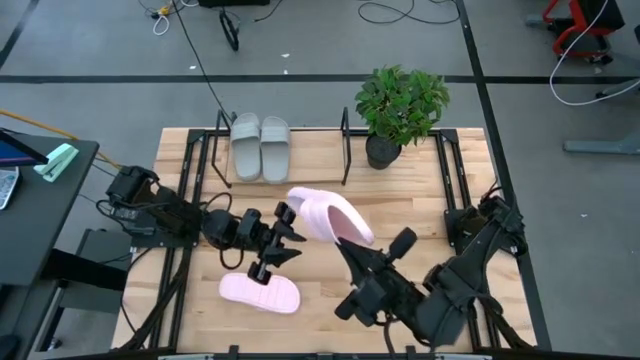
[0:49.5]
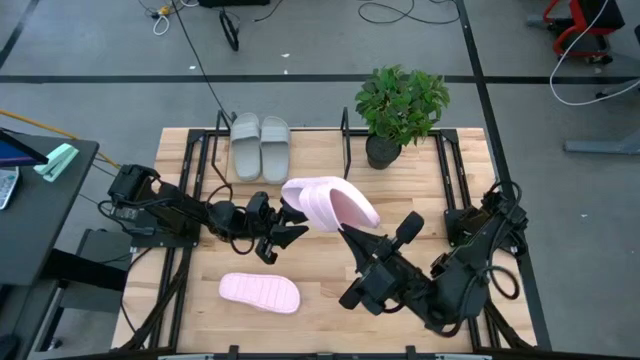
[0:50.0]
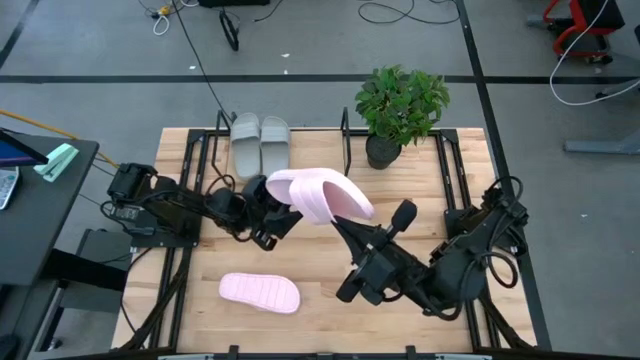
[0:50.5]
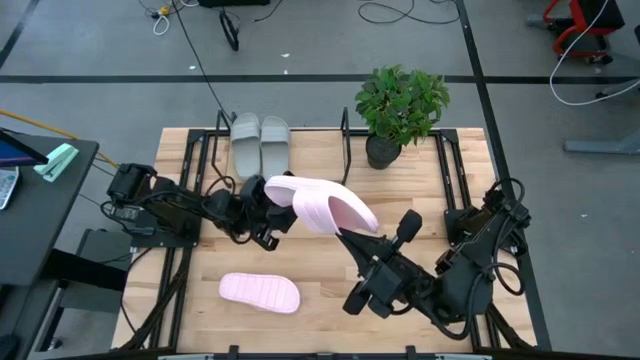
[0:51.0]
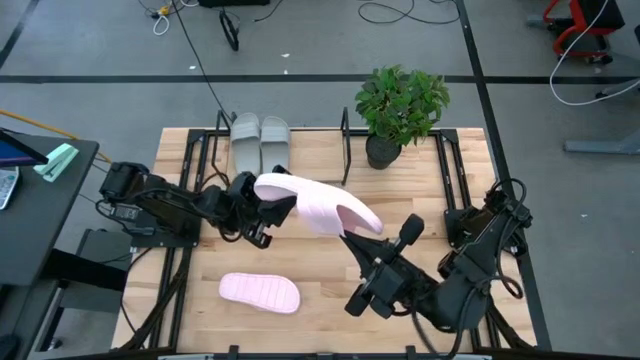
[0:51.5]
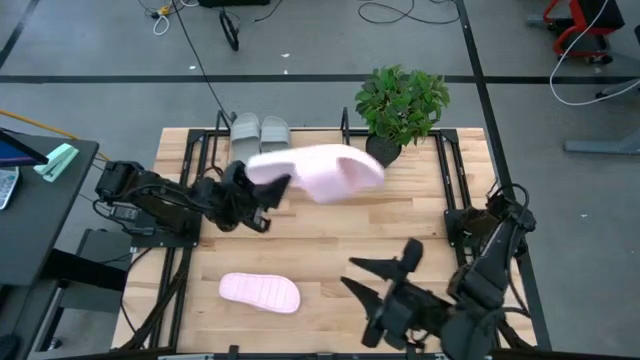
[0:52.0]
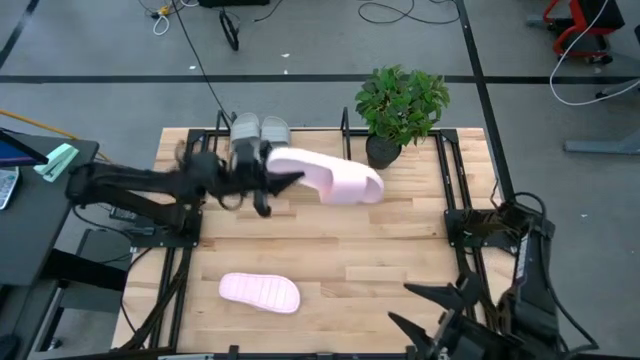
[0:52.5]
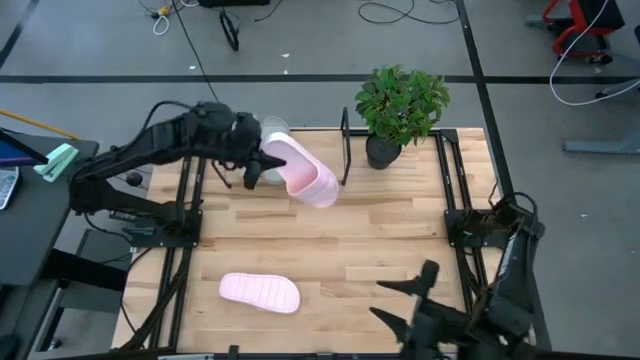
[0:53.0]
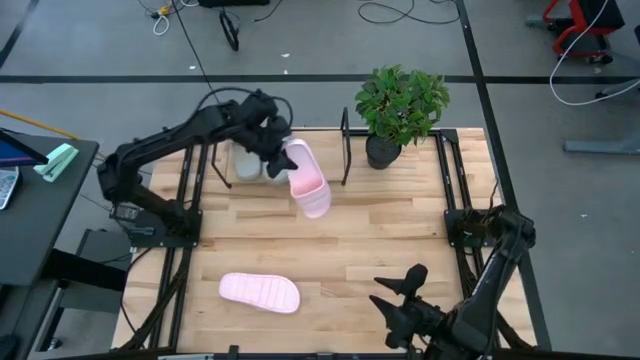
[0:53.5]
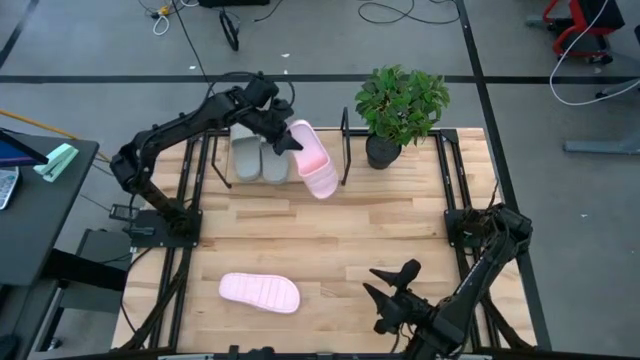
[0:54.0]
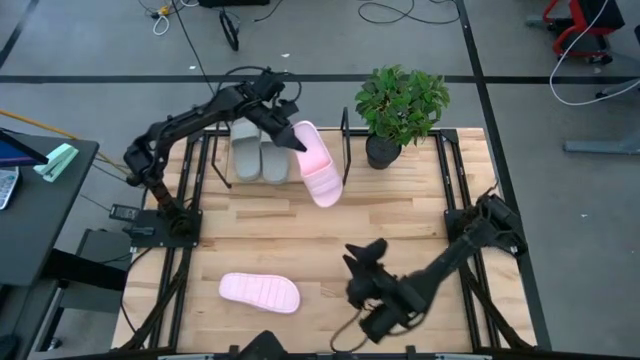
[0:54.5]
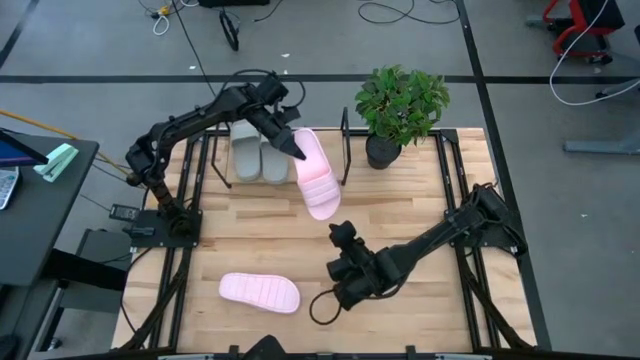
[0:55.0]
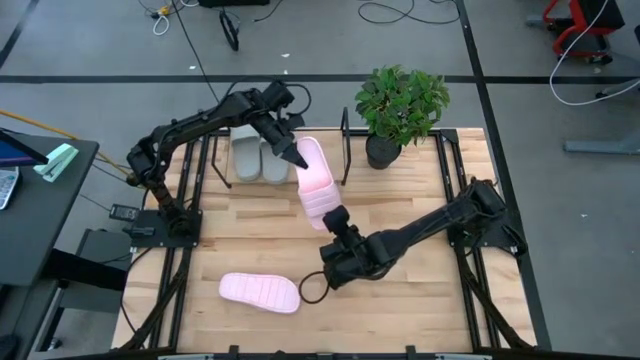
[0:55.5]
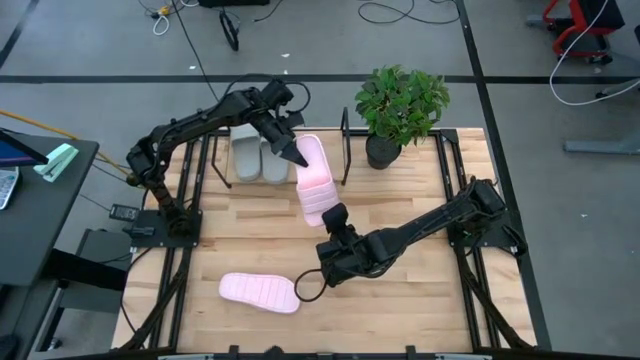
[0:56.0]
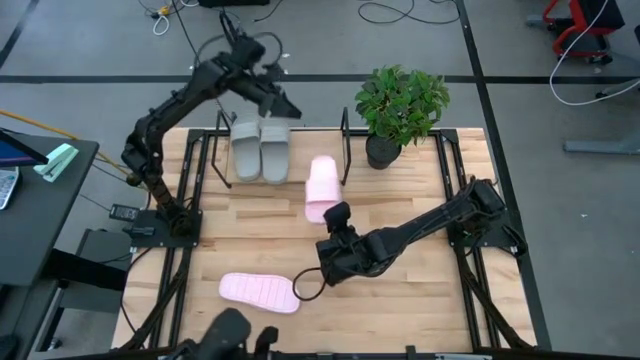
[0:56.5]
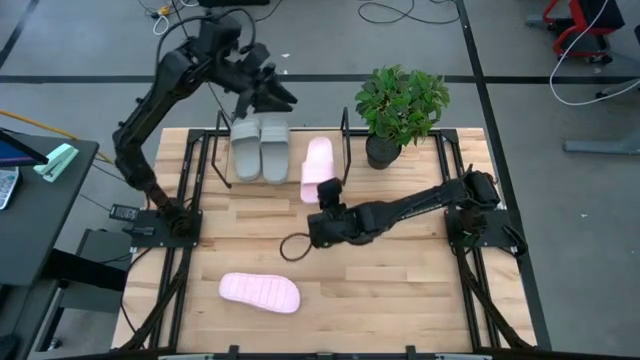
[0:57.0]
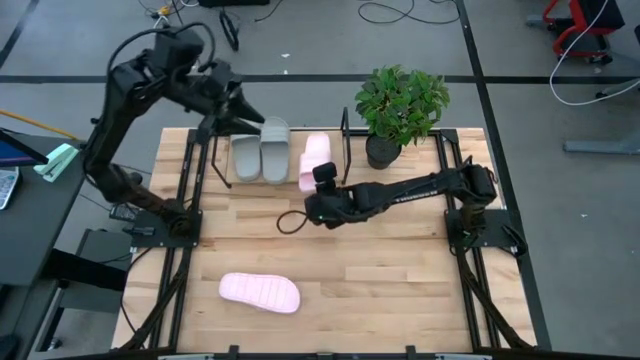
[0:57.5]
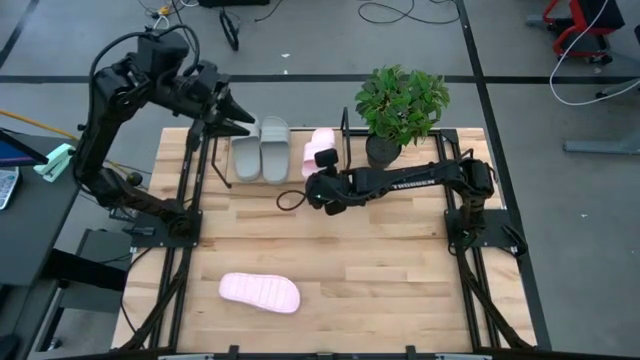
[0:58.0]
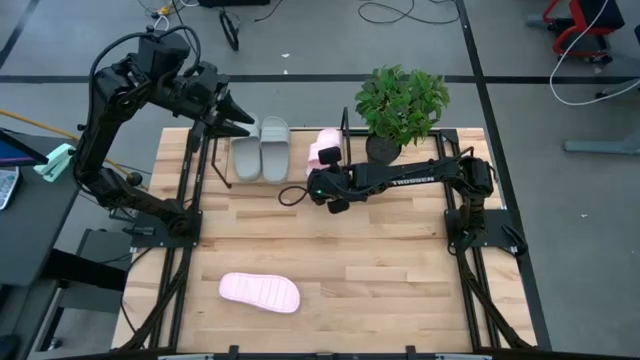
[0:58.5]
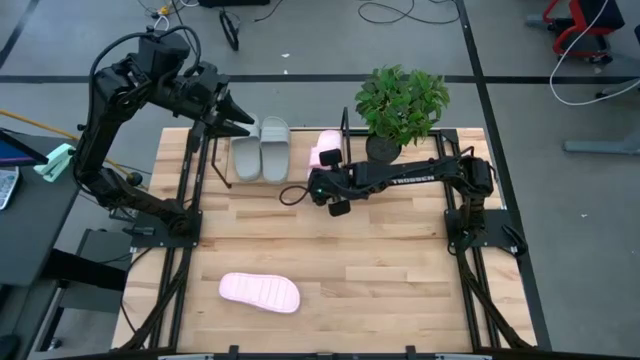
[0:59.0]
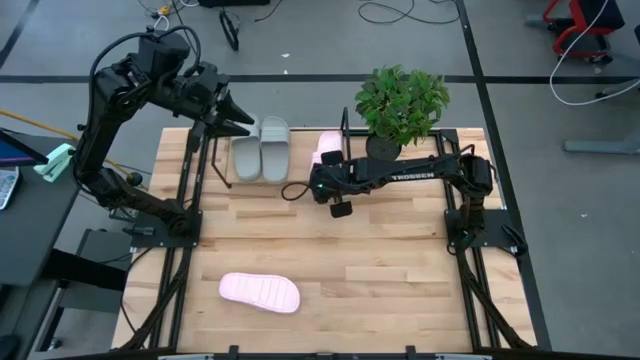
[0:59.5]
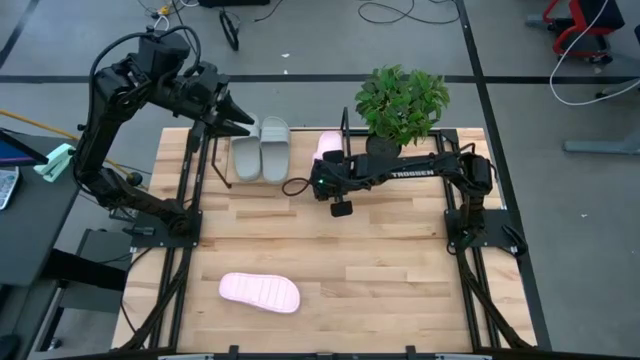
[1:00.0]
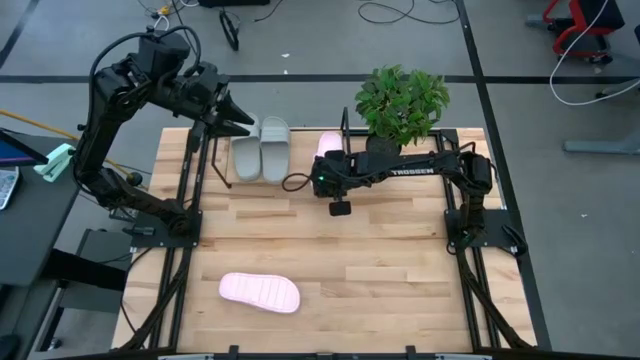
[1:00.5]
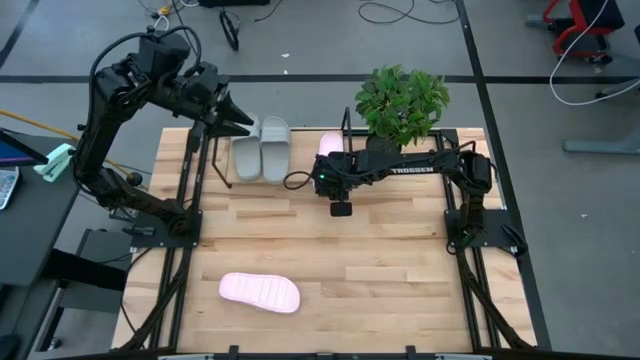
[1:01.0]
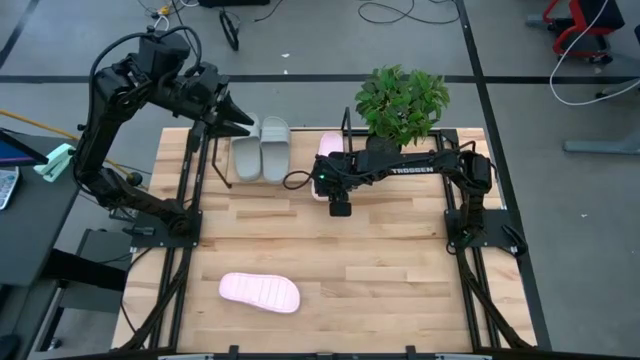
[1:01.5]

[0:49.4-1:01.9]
Task: Pick and place slides into the shelf
Put the bottom pink slipper on the shelf

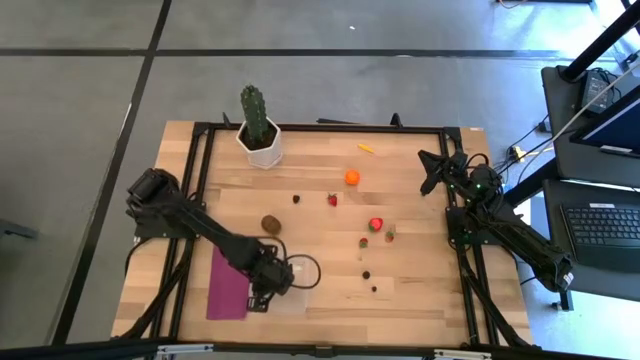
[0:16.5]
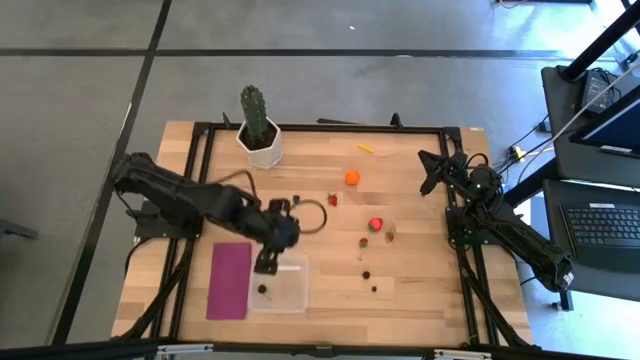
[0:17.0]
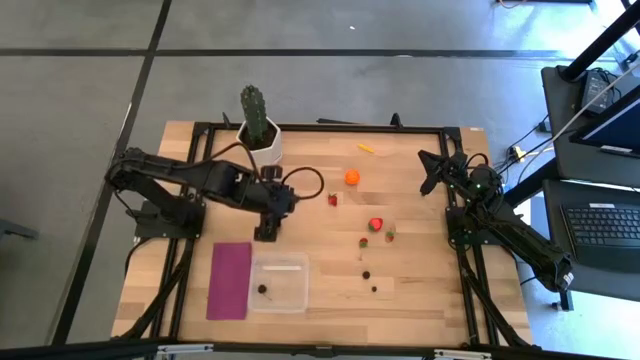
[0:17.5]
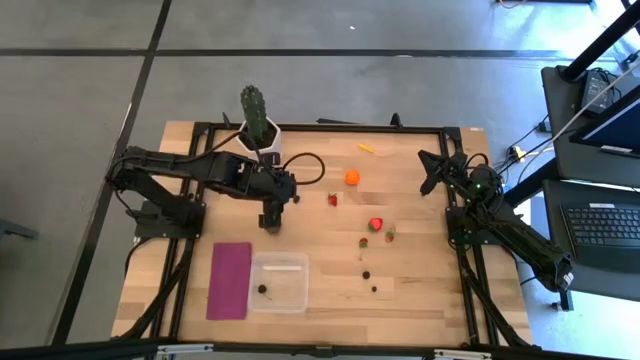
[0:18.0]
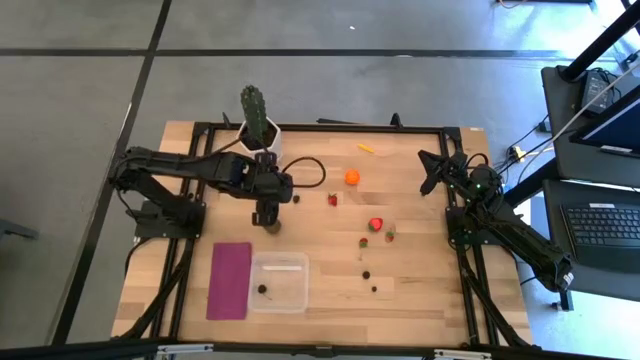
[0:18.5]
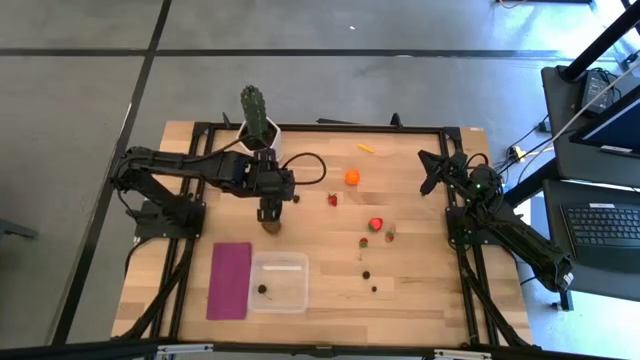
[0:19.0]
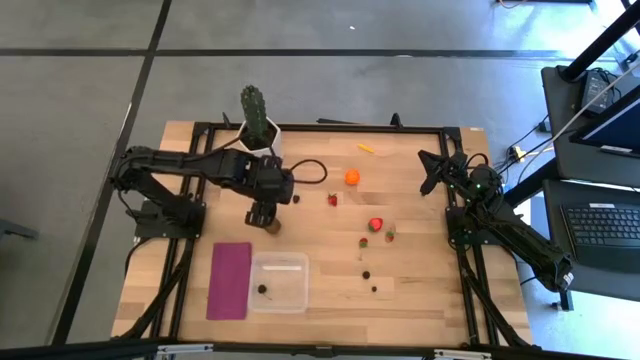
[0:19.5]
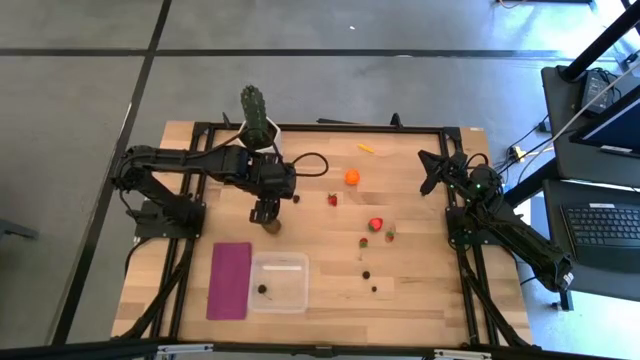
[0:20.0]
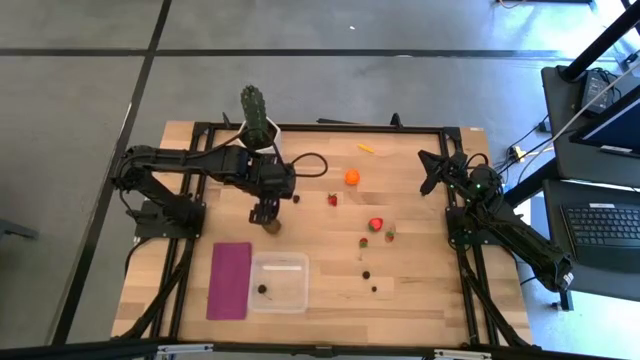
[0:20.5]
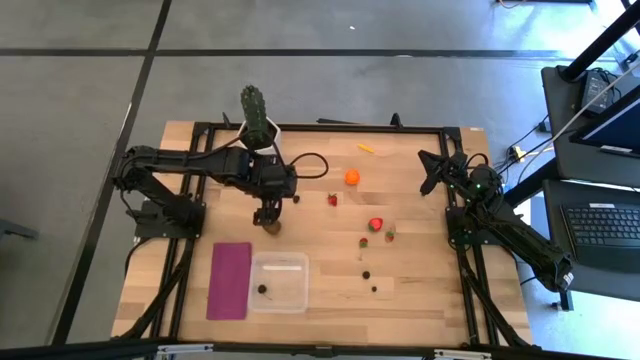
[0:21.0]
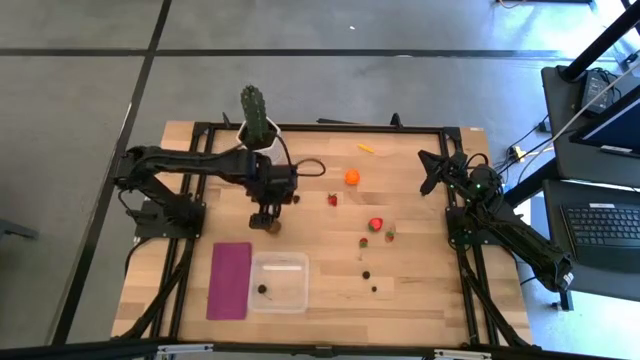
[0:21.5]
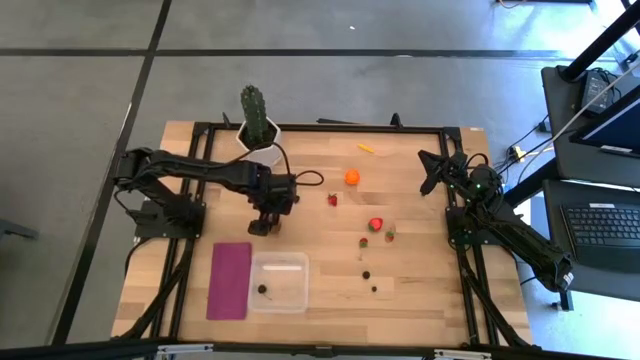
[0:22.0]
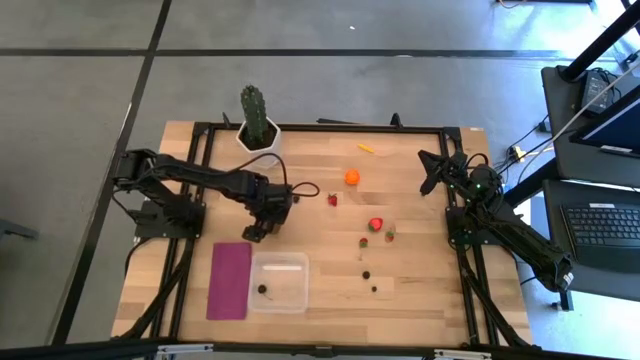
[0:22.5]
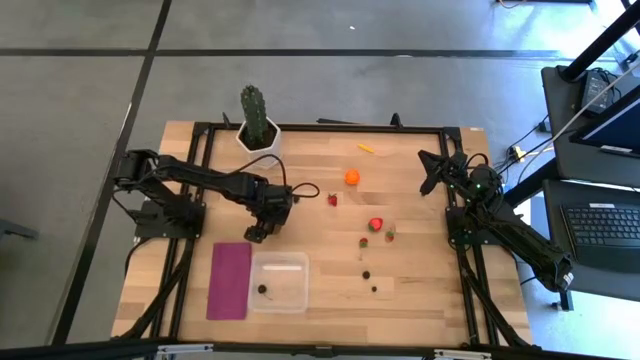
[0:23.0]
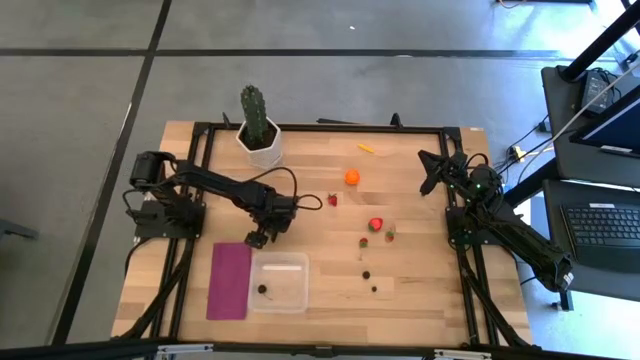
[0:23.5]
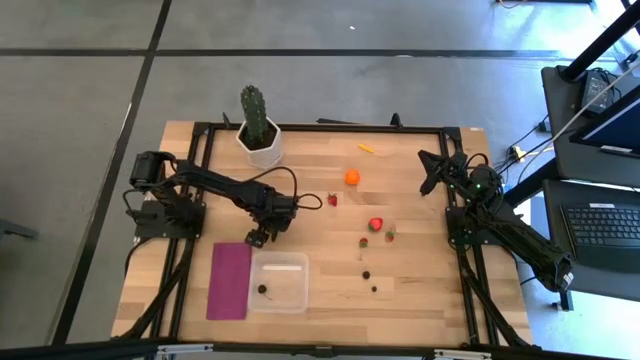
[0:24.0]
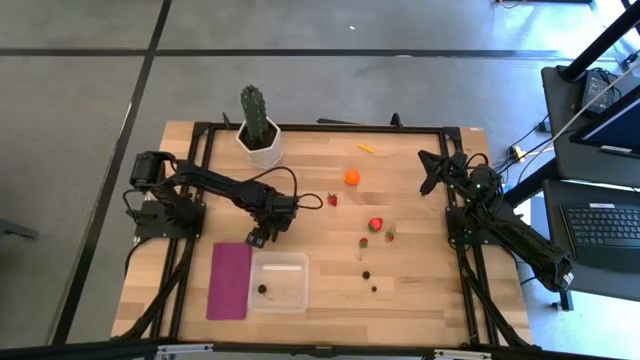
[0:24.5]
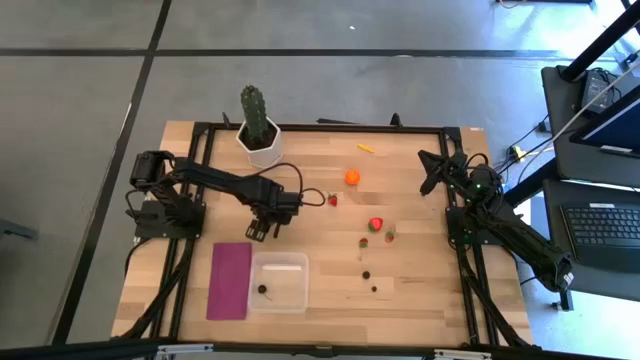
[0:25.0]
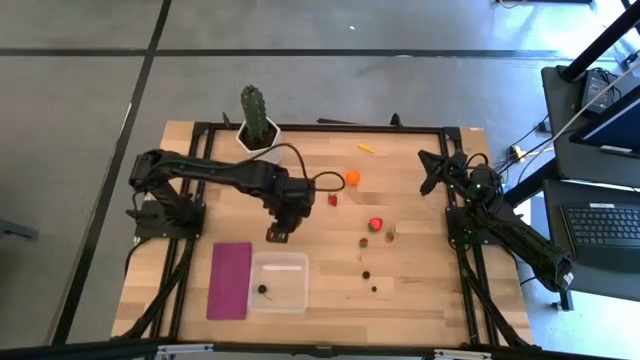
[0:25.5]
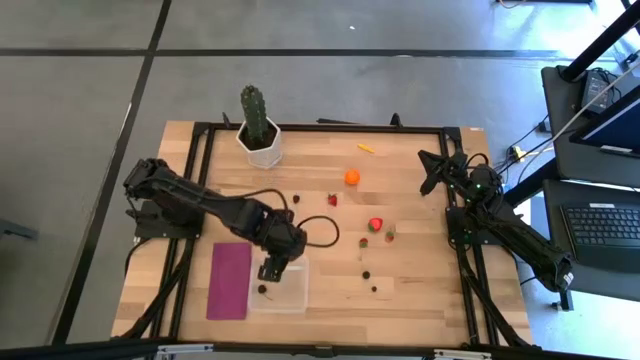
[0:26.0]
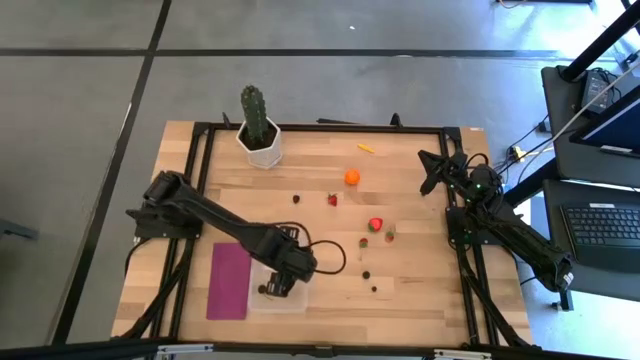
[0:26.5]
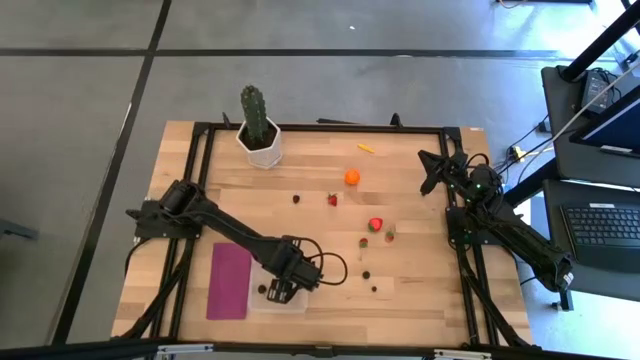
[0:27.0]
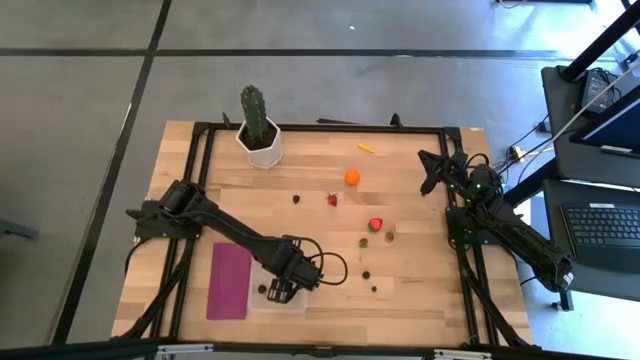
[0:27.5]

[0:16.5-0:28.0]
Task: Pick and placing Produce into tupperware
Put the kiwi into the transparent bin
